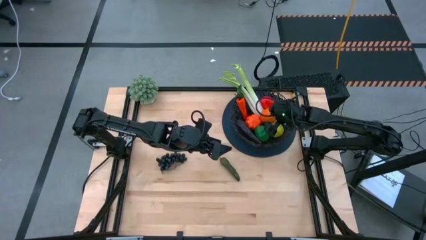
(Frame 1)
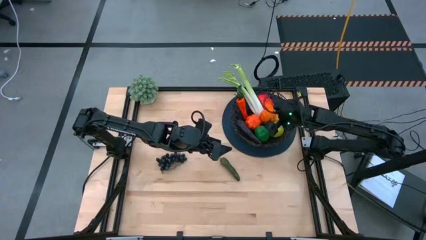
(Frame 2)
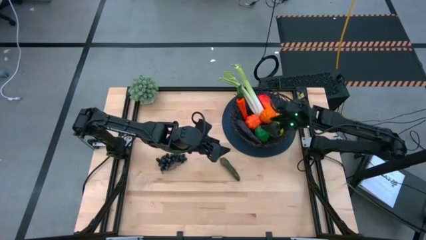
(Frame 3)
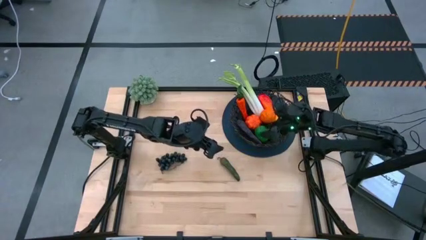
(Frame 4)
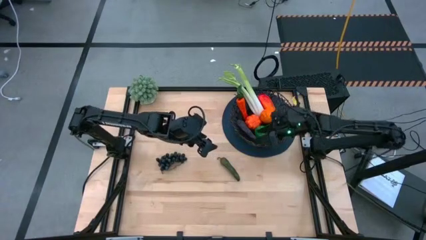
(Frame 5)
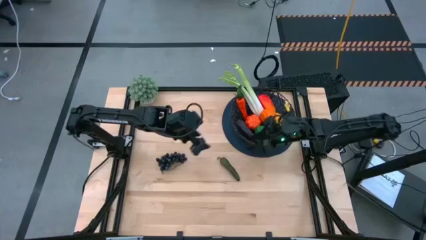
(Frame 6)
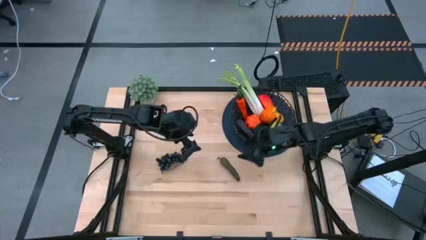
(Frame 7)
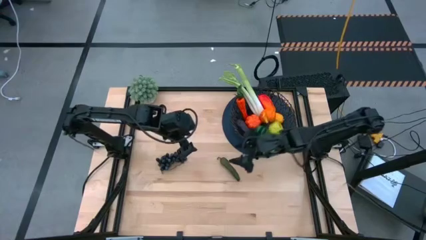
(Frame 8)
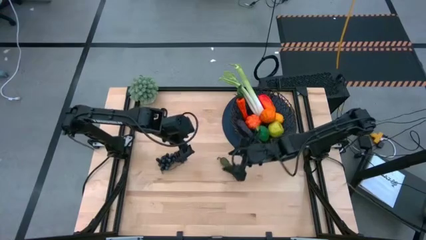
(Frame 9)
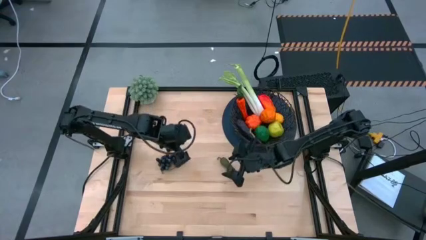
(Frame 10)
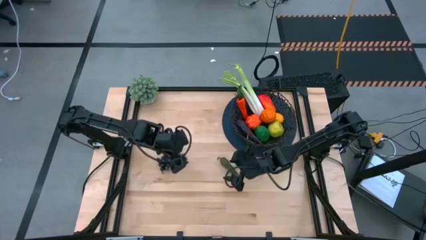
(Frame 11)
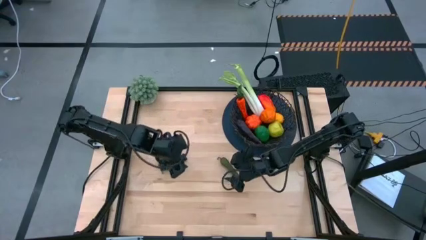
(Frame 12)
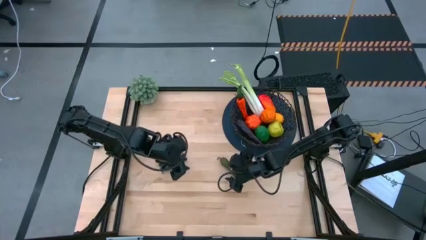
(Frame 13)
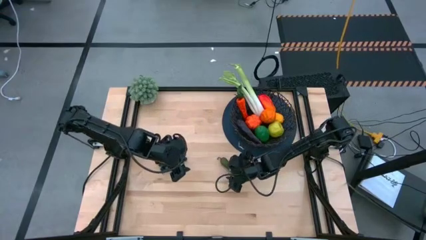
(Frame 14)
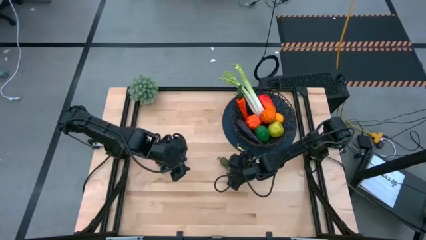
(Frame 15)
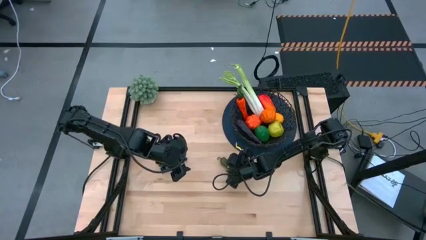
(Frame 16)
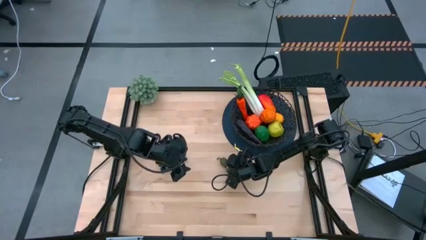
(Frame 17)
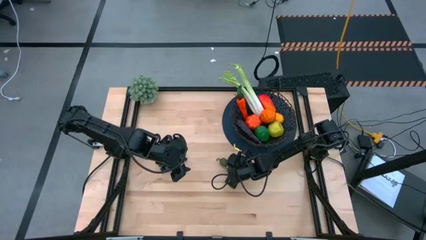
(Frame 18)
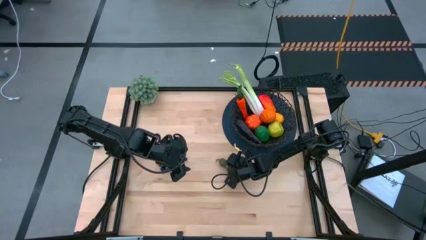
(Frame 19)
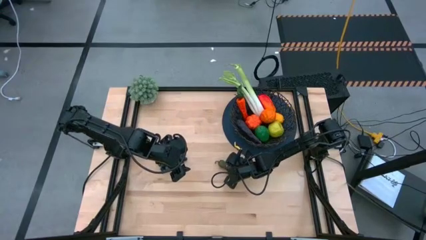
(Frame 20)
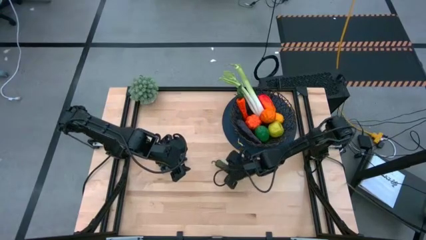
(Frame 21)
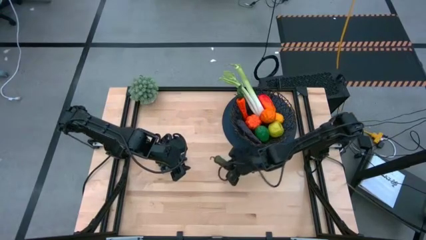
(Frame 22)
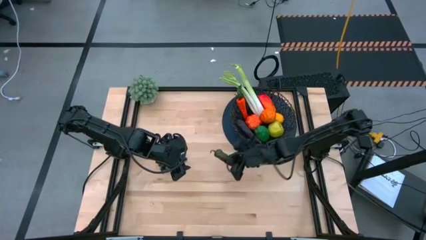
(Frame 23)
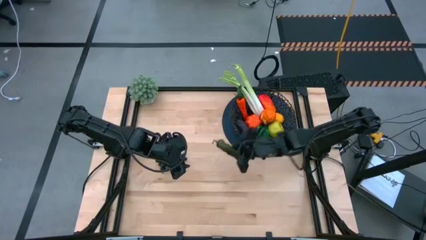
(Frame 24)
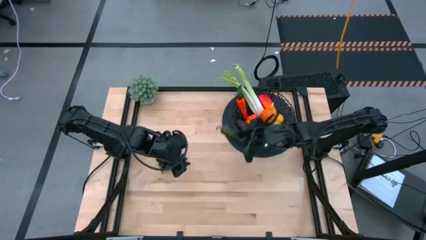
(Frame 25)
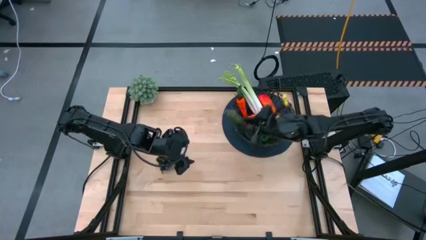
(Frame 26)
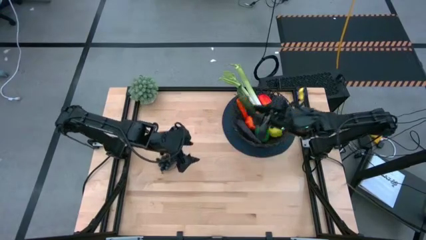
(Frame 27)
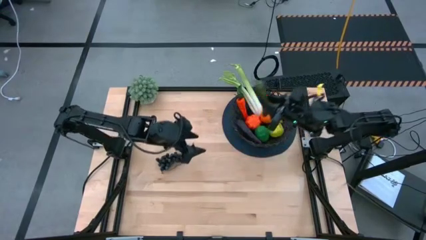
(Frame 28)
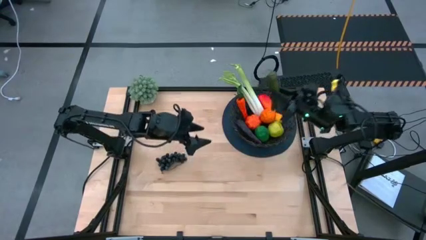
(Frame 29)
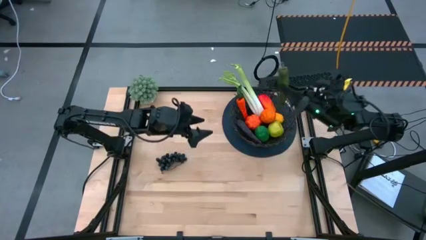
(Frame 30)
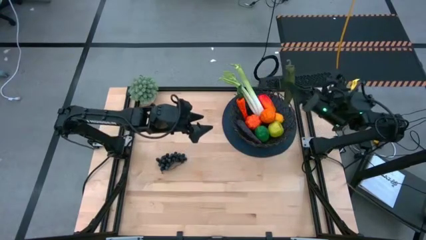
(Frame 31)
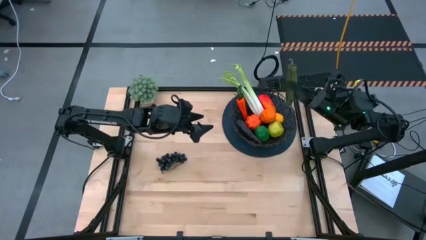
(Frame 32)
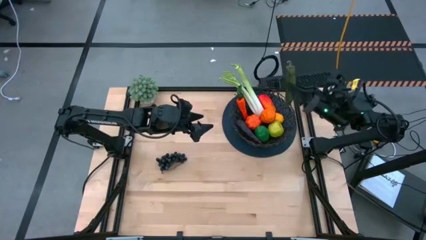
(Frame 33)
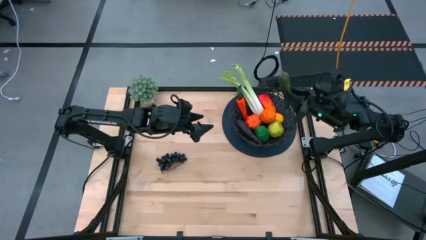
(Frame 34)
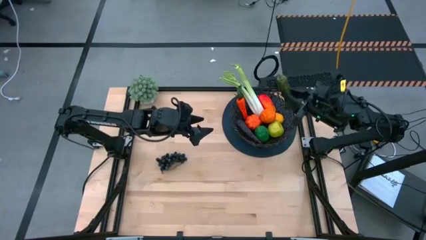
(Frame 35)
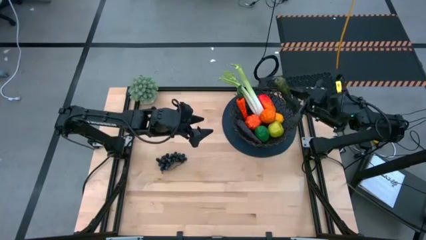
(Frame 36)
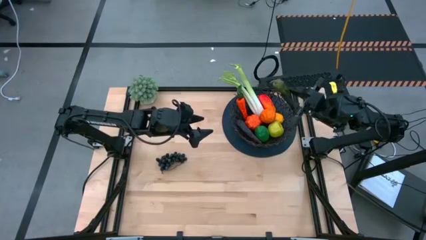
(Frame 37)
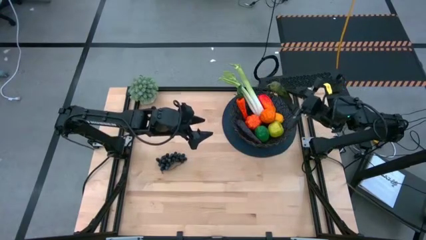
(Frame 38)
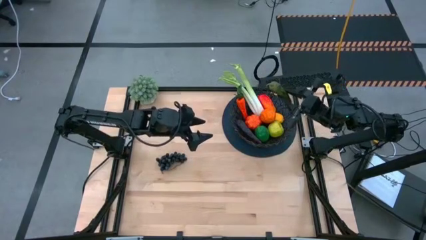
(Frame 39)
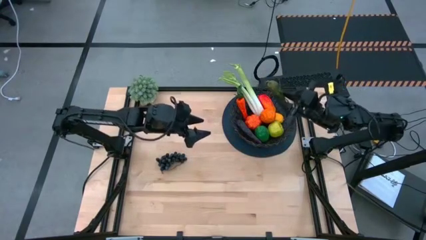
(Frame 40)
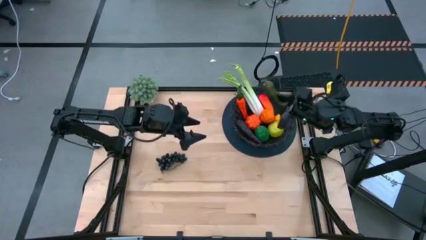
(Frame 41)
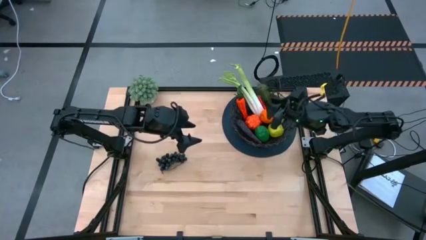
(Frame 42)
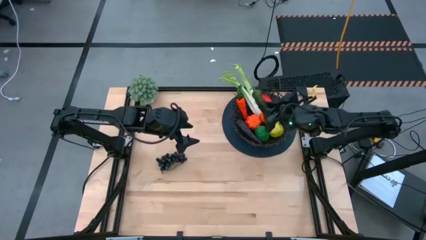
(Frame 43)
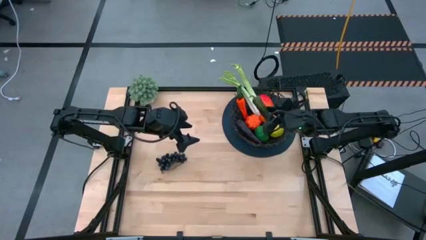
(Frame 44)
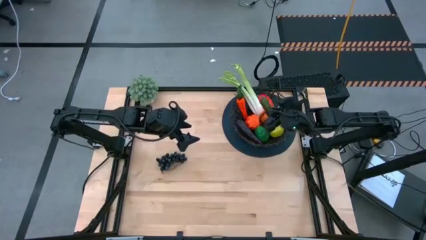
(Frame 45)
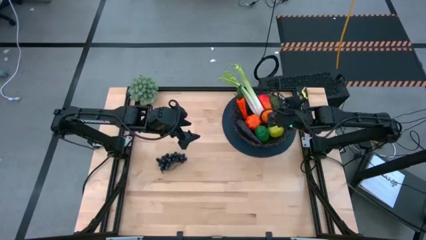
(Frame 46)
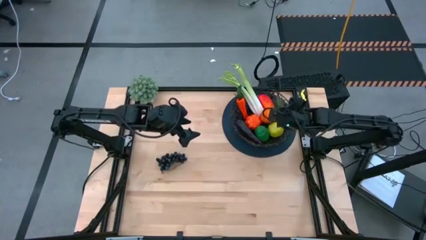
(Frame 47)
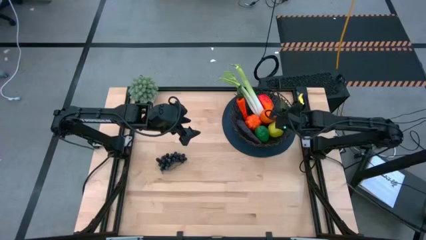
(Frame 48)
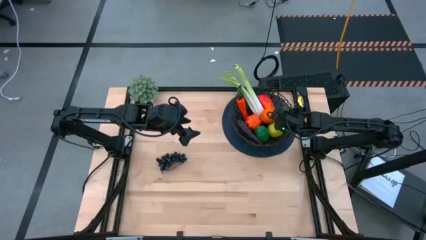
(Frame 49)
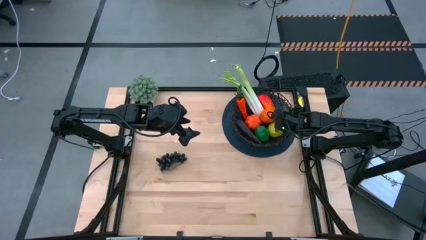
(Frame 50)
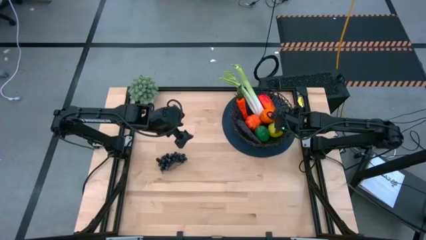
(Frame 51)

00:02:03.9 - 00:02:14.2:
Task: Build produce basket
Put the green pepper into the black woven basket
